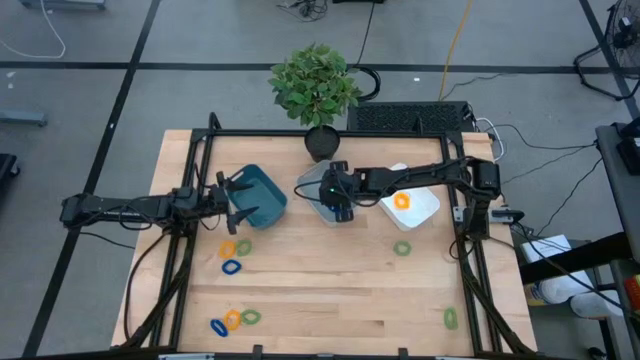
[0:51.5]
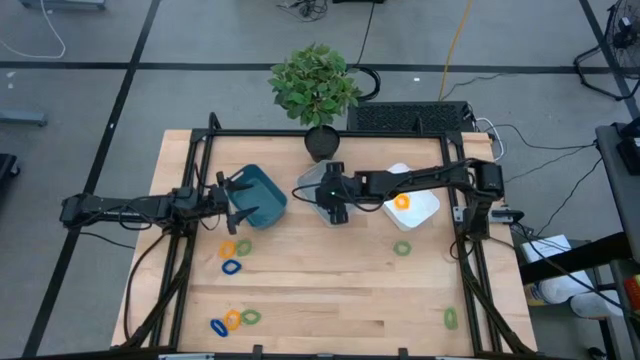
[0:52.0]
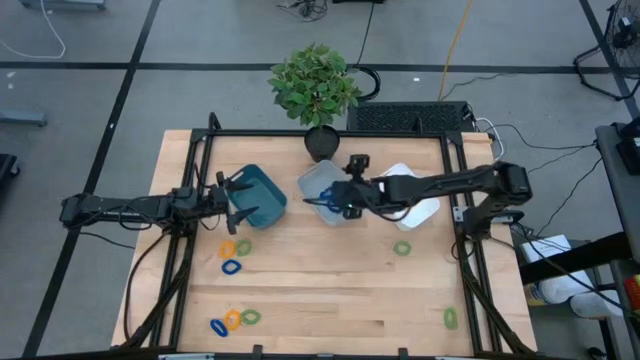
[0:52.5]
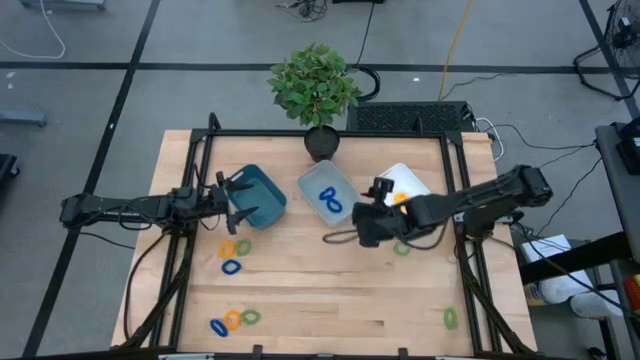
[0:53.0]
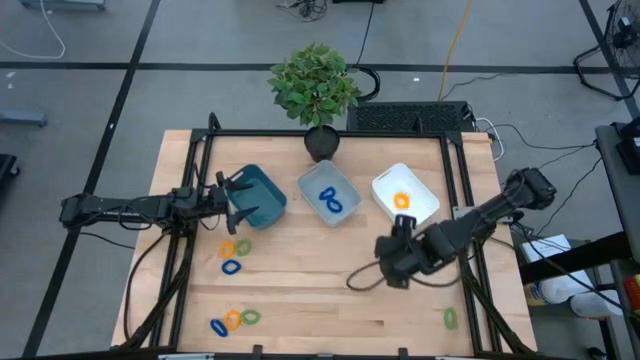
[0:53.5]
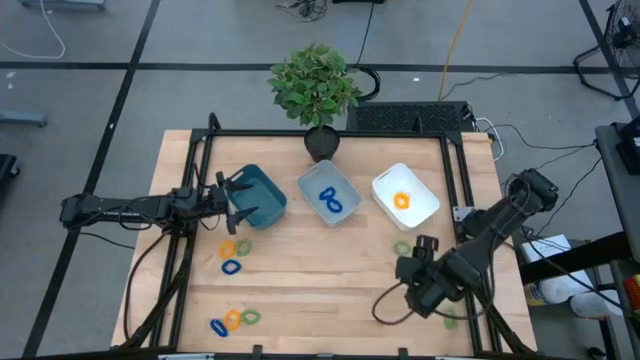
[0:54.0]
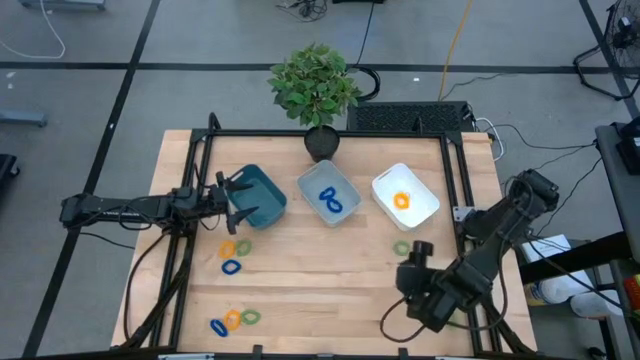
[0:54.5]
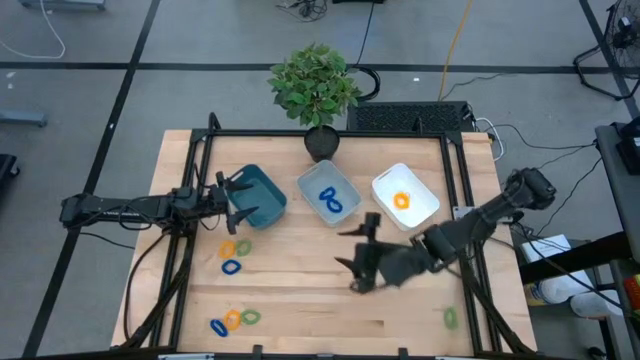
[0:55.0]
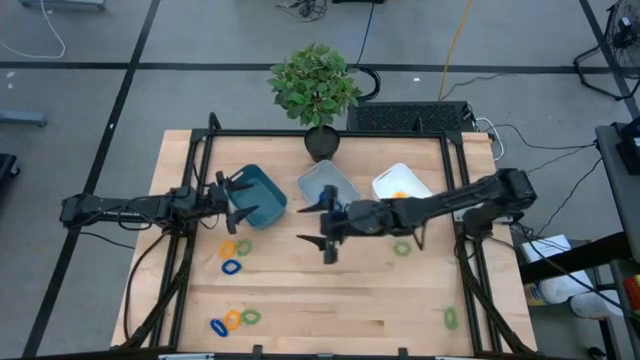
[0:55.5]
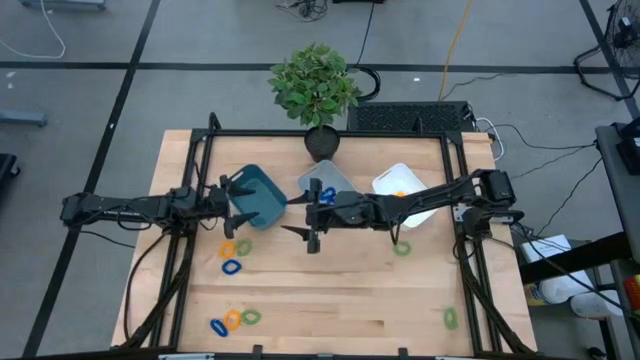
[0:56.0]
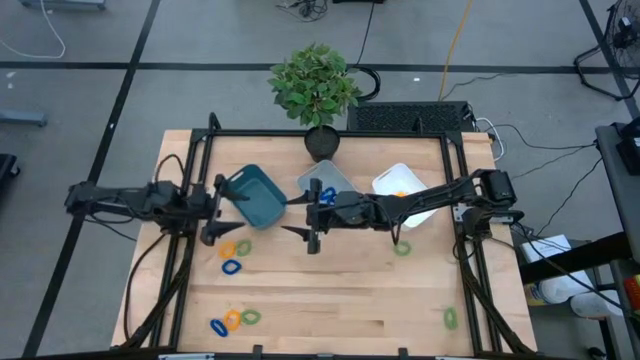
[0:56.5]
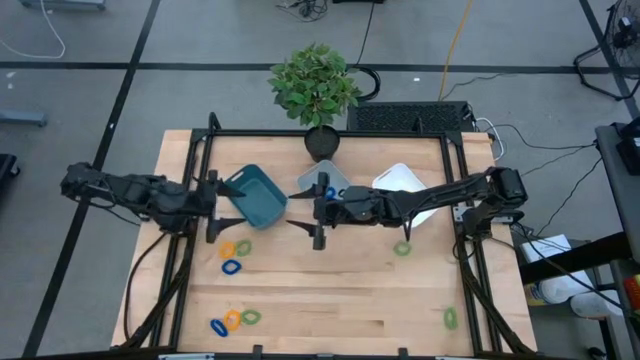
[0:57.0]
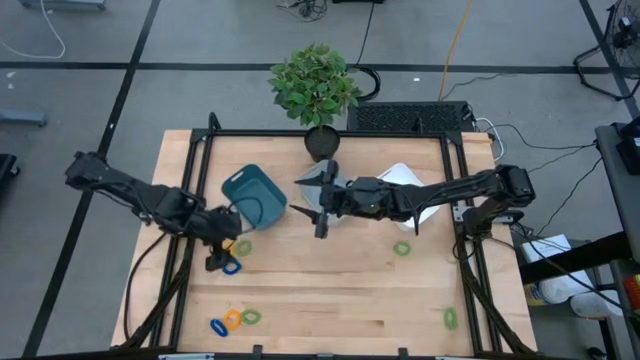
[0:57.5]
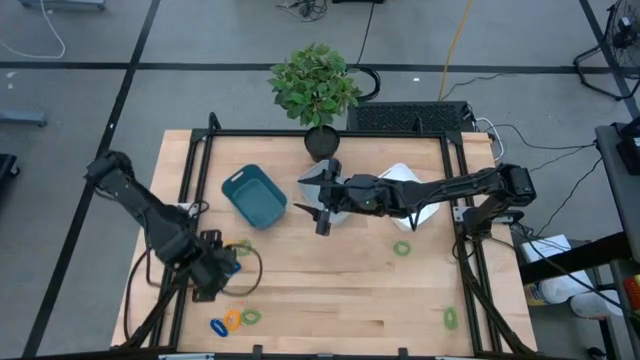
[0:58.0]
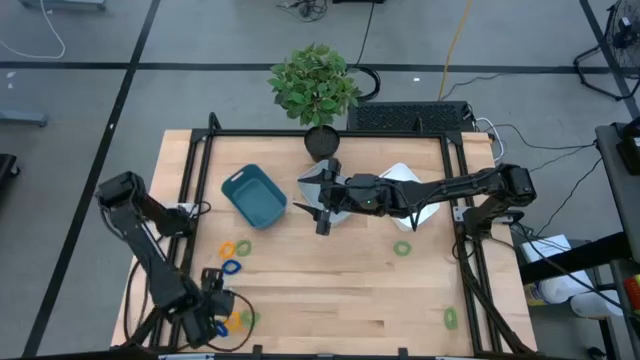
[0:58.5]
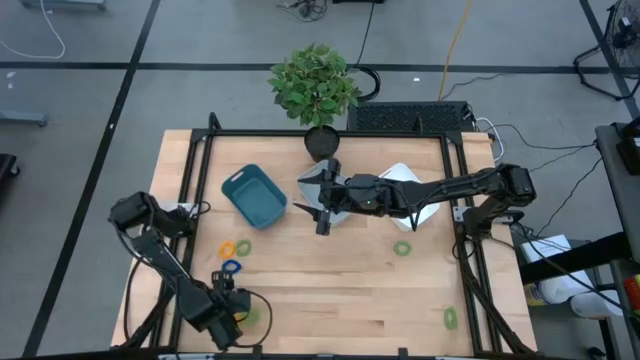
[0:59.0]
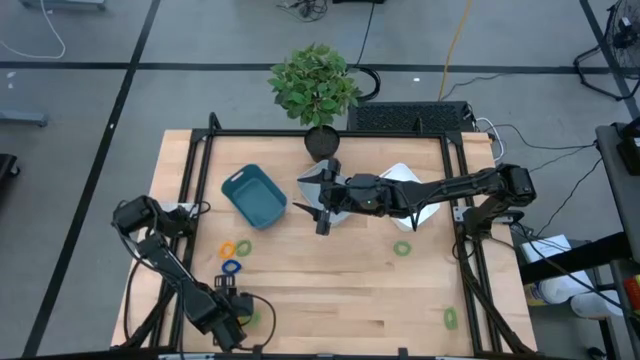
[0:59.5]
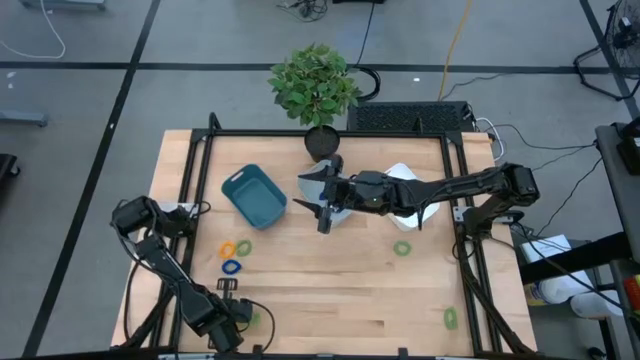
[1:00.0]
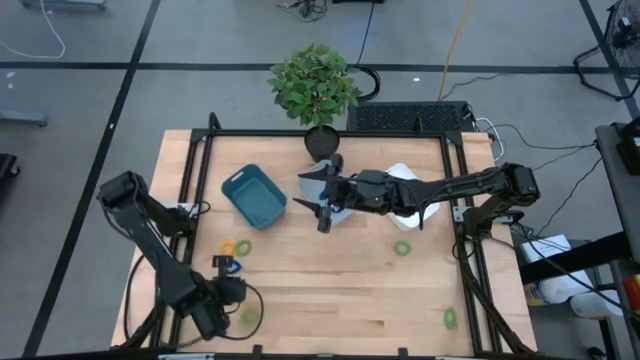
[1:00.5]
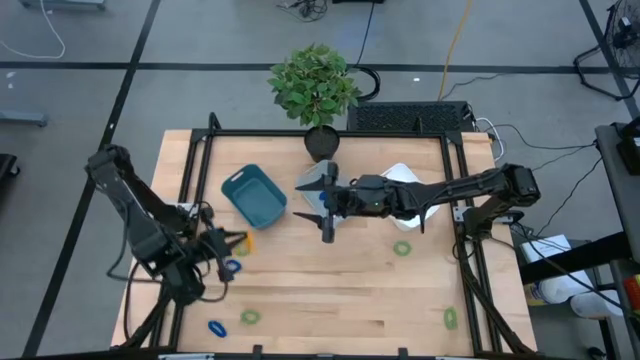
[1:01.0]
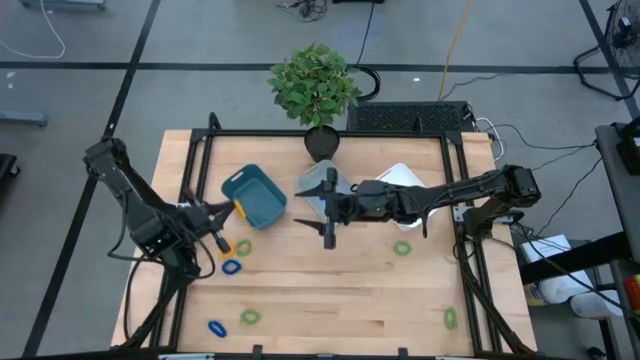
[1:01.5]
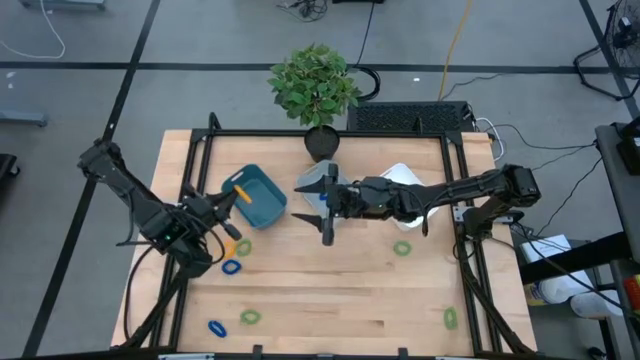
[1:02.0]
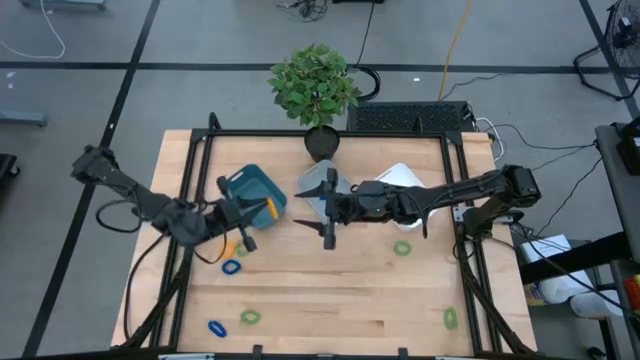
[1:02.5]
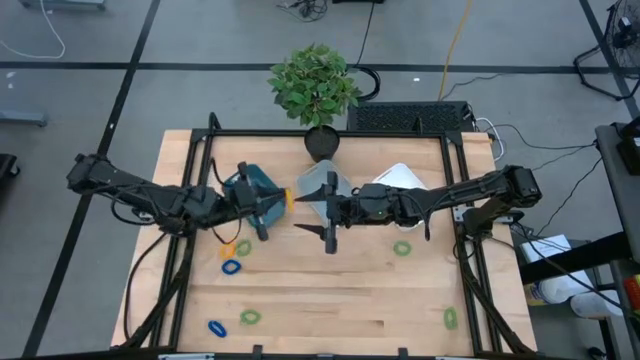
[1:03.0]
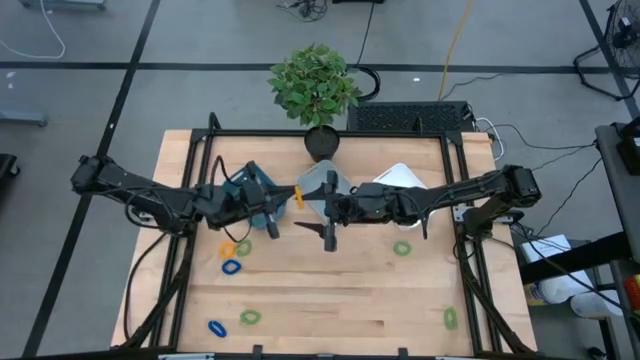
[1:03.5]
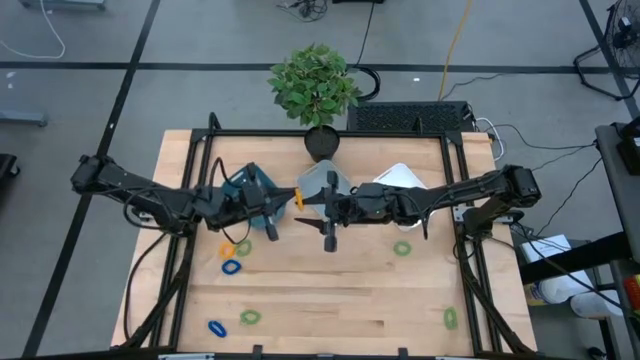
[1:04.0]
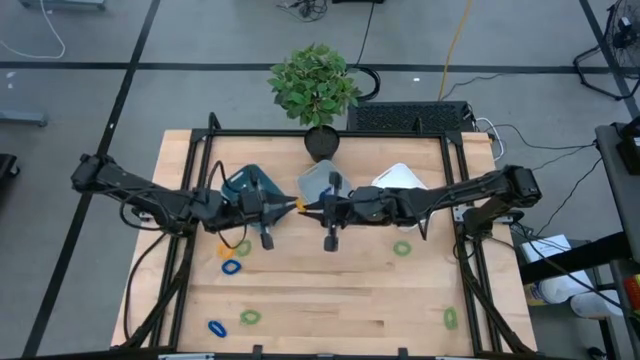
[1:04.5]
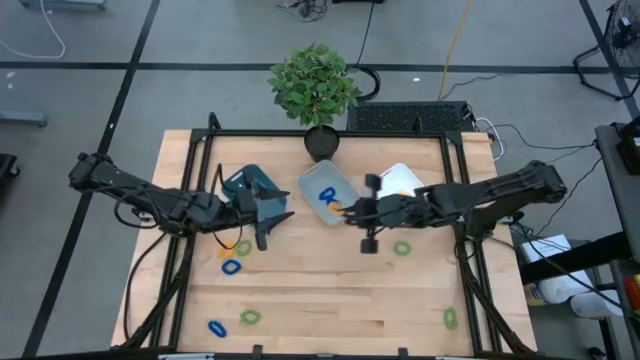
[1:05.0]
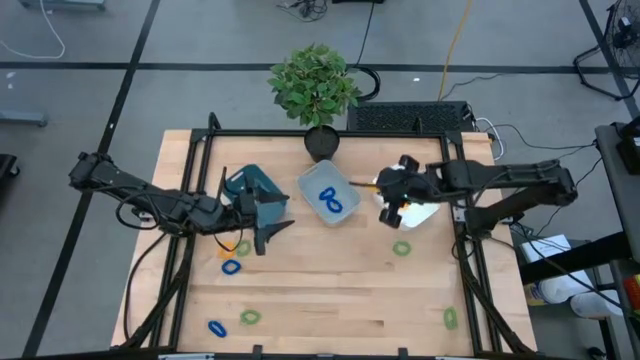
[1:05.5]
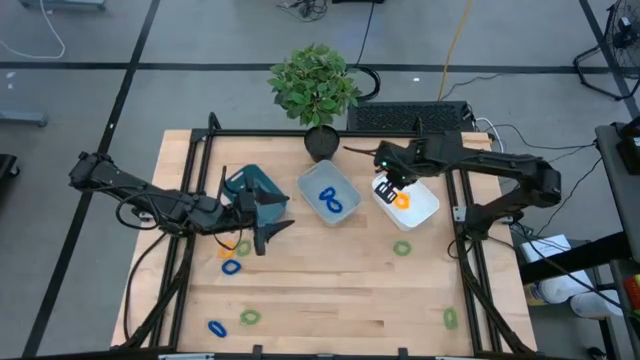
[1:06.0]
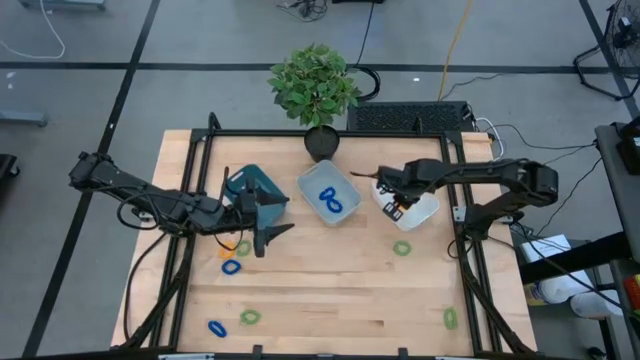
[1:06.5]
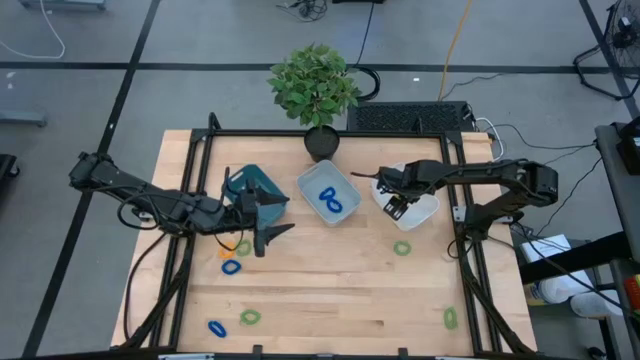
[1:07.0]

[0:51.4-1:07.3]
Task: Sort spring keychains
Put the bottom yellow spring keychain into the white bin

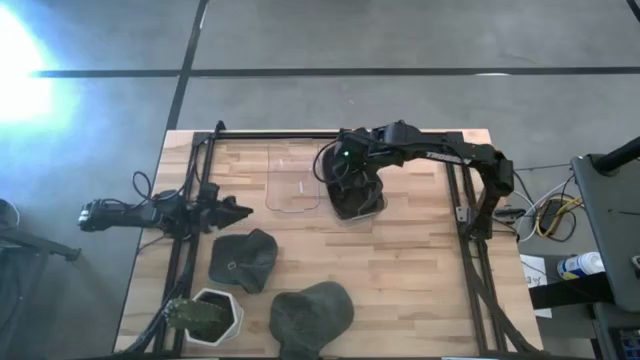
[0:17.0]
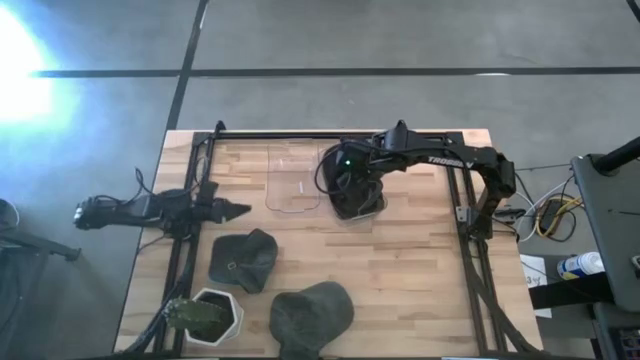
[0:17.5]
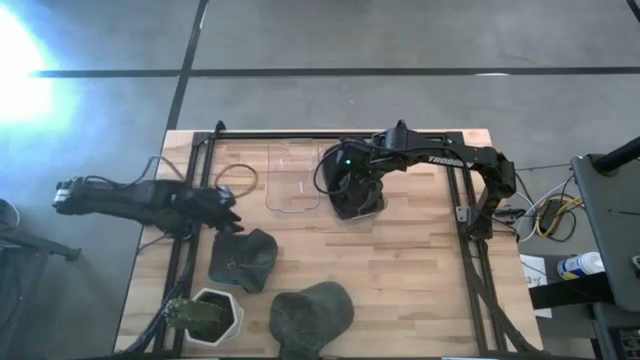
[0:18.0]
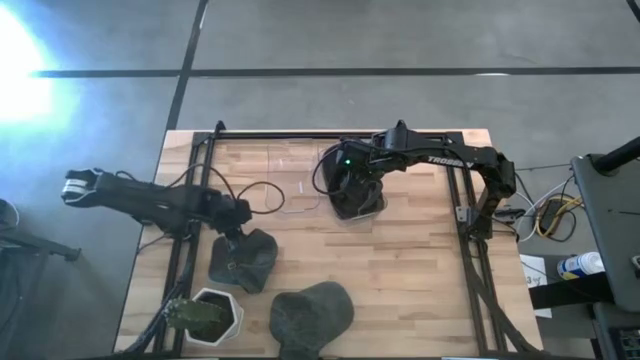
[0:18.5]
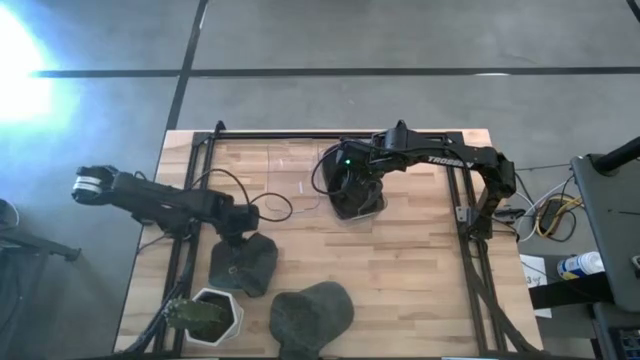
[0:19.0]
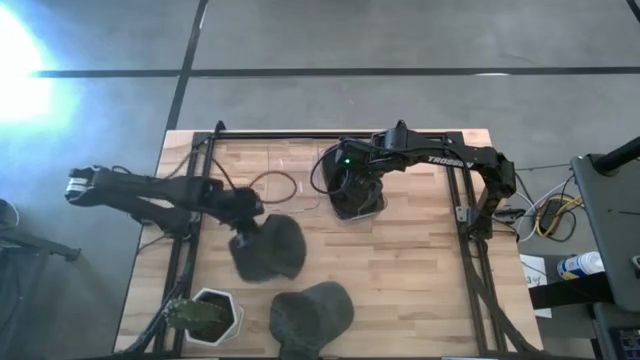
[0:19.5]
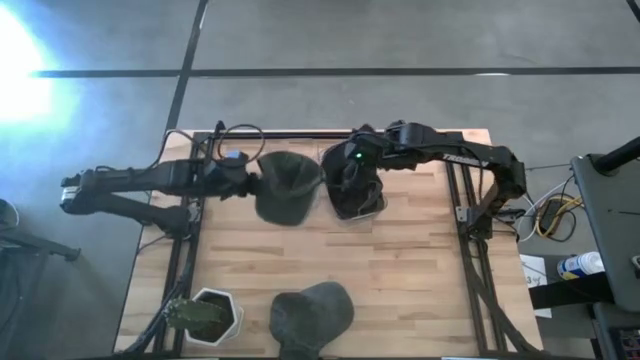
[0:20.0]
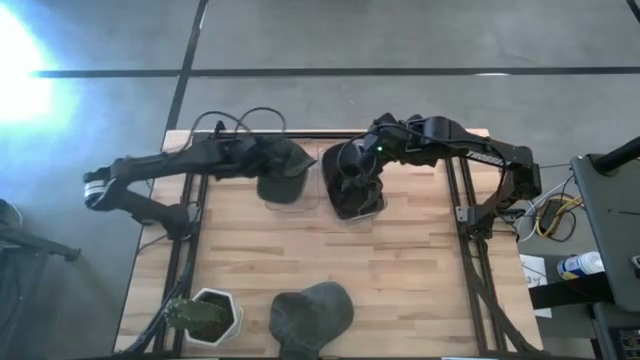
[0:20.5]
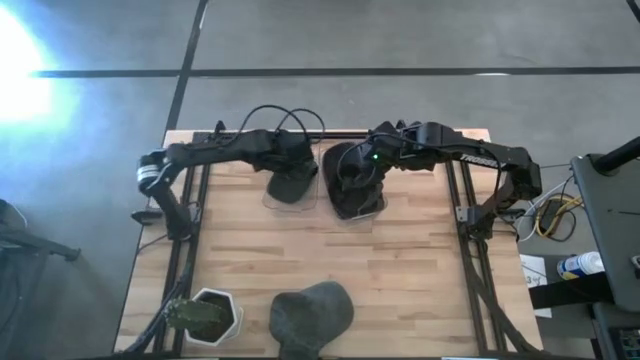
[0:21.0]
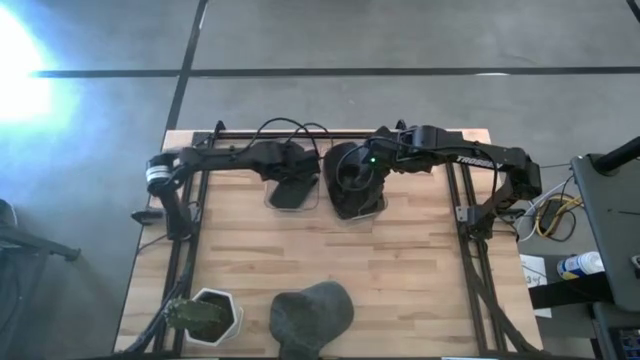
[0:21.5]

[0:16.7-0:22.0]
Task: Pick & Place hat
Put the left dark green cap into the left transparent bin
